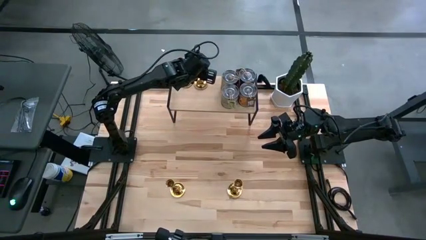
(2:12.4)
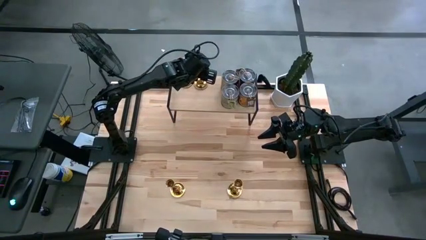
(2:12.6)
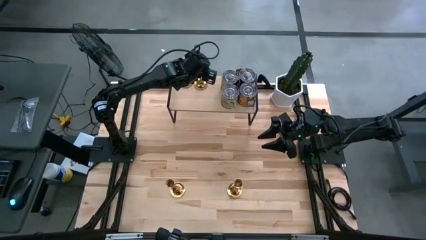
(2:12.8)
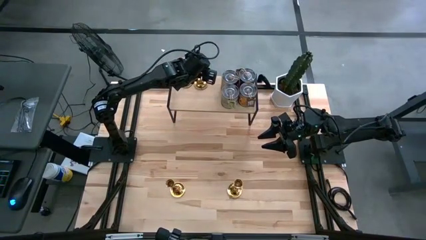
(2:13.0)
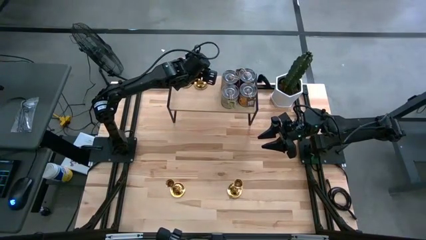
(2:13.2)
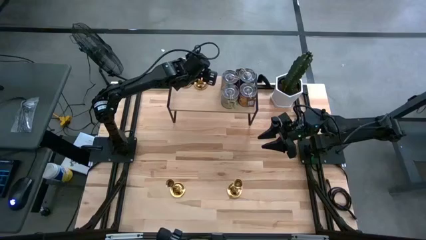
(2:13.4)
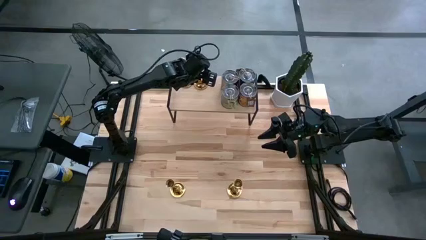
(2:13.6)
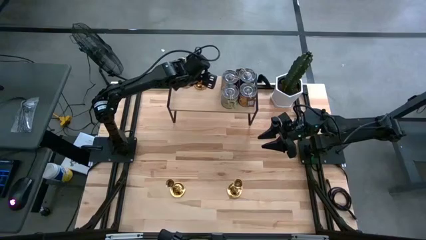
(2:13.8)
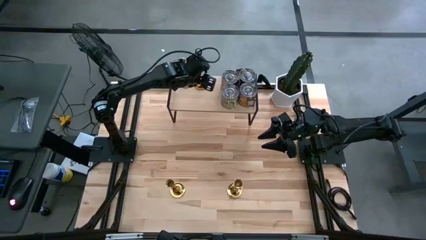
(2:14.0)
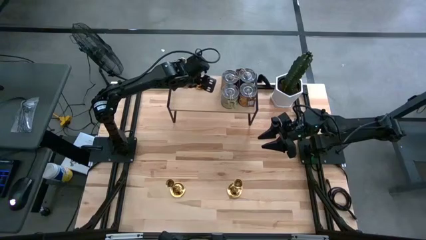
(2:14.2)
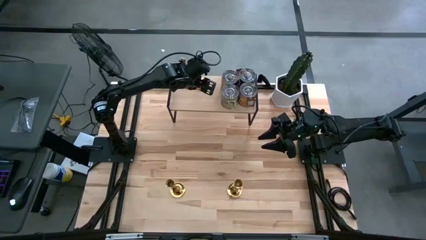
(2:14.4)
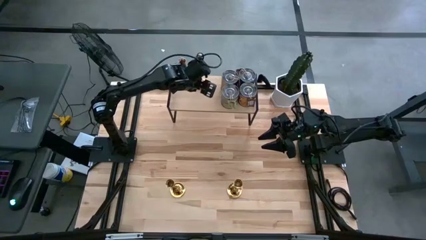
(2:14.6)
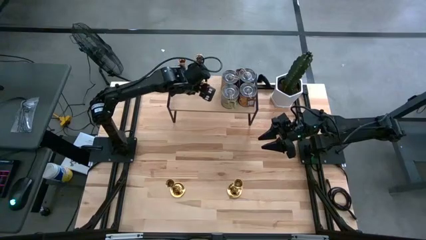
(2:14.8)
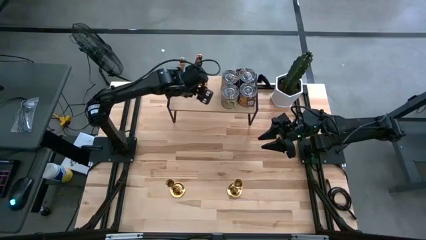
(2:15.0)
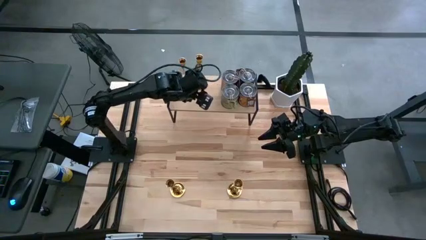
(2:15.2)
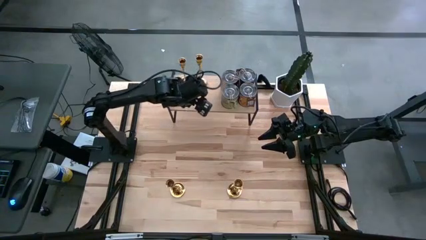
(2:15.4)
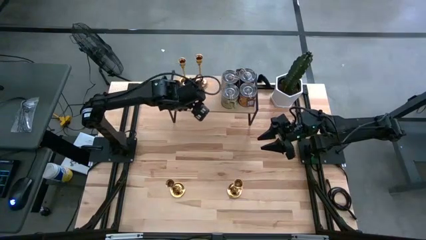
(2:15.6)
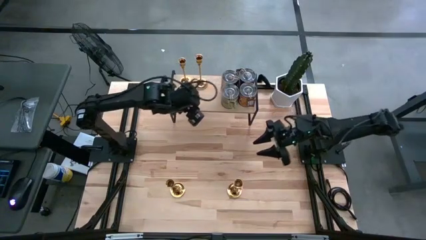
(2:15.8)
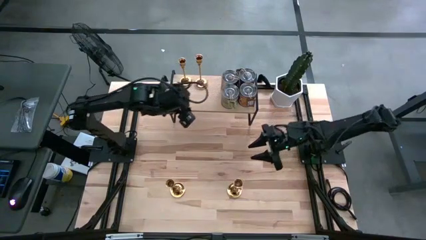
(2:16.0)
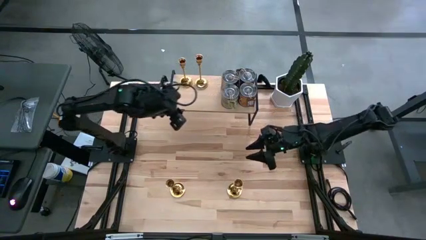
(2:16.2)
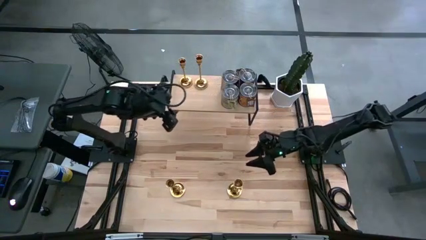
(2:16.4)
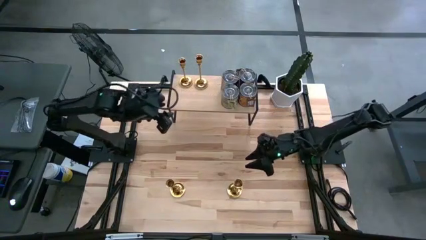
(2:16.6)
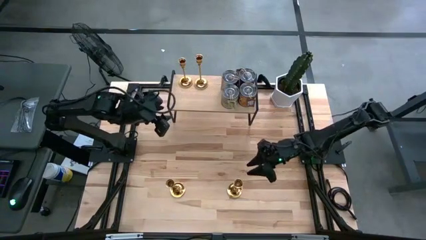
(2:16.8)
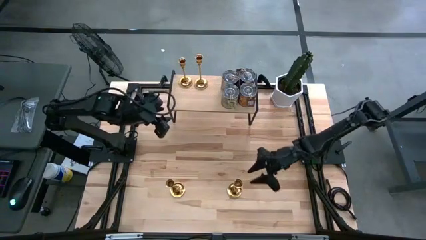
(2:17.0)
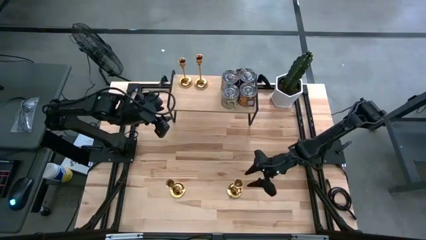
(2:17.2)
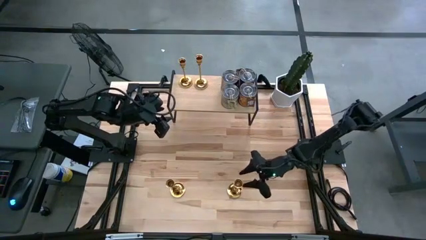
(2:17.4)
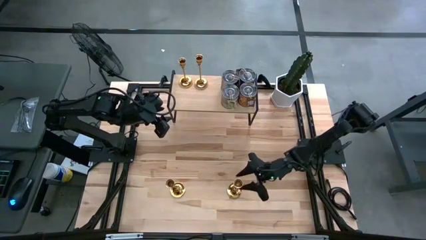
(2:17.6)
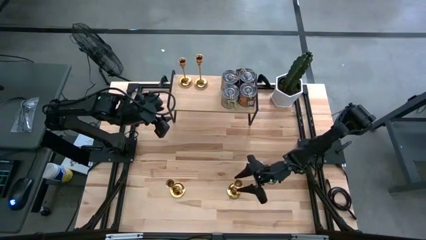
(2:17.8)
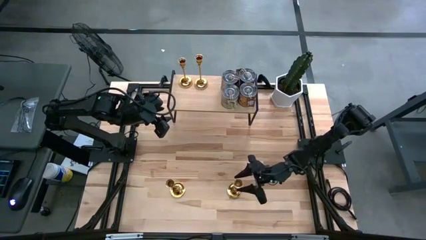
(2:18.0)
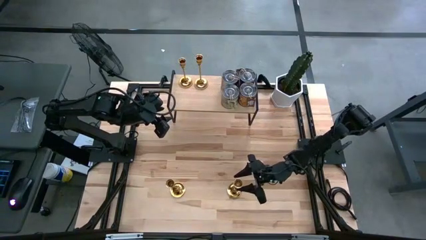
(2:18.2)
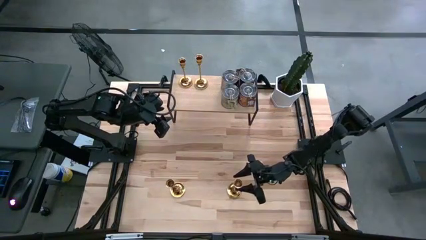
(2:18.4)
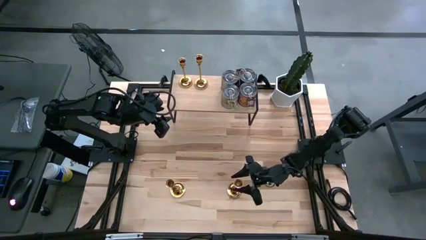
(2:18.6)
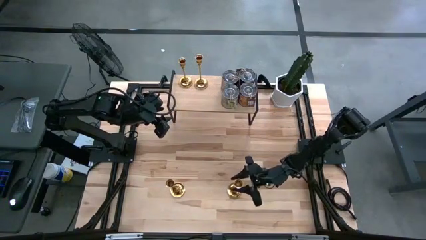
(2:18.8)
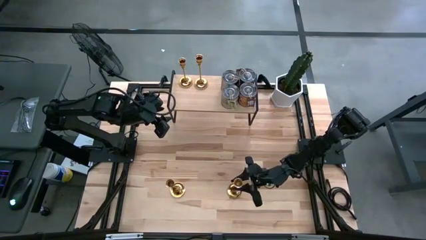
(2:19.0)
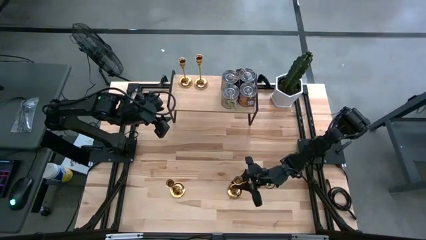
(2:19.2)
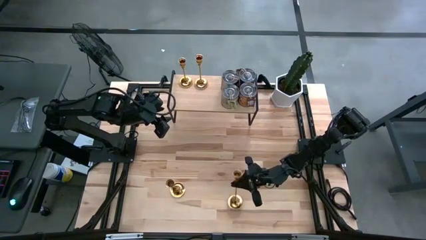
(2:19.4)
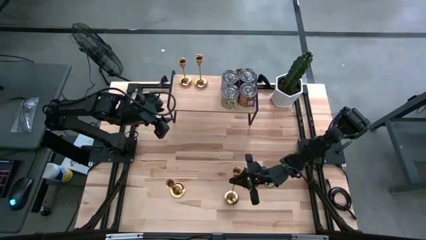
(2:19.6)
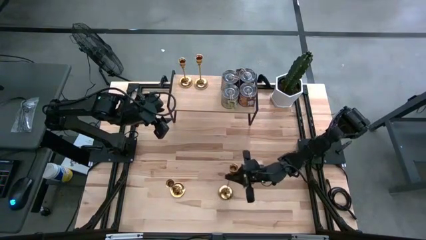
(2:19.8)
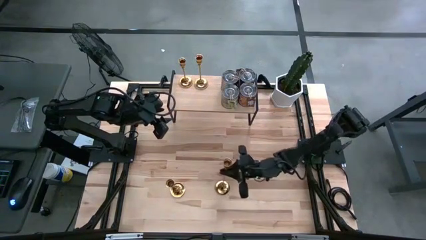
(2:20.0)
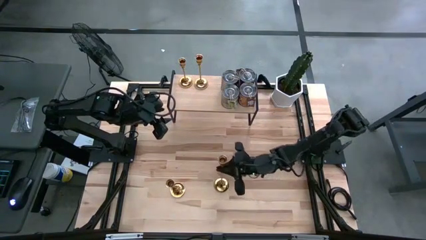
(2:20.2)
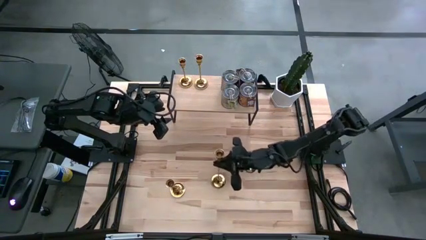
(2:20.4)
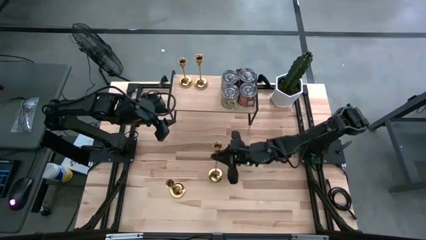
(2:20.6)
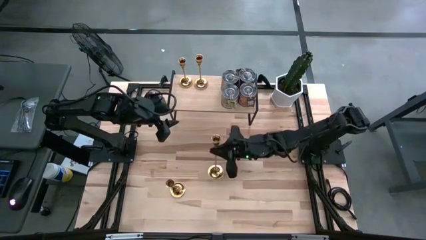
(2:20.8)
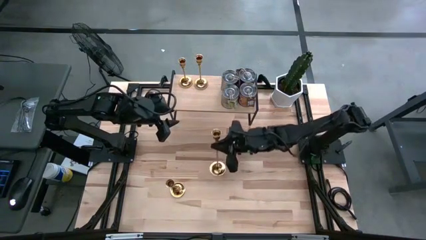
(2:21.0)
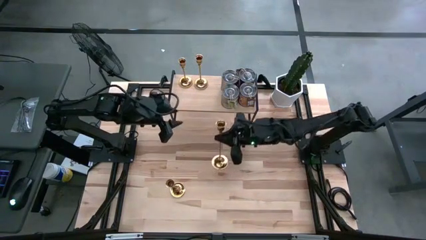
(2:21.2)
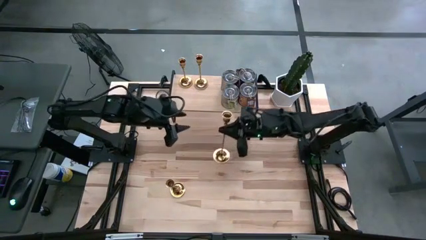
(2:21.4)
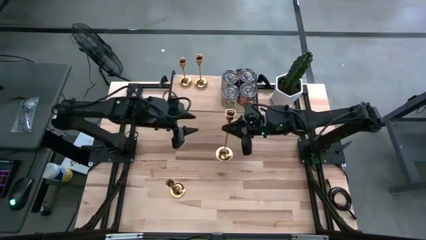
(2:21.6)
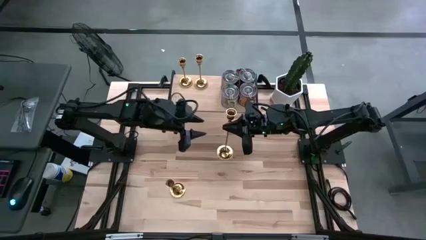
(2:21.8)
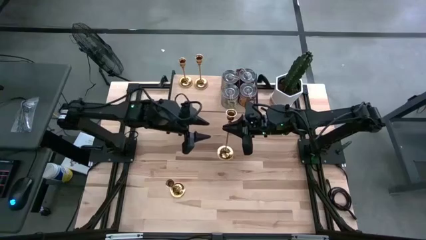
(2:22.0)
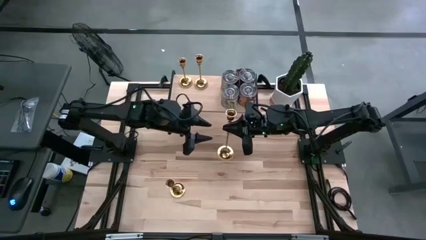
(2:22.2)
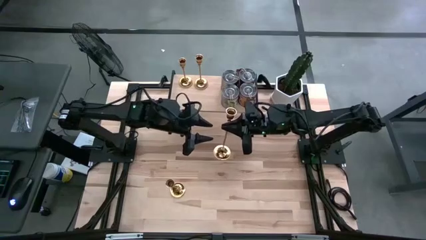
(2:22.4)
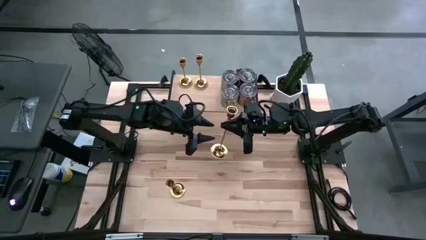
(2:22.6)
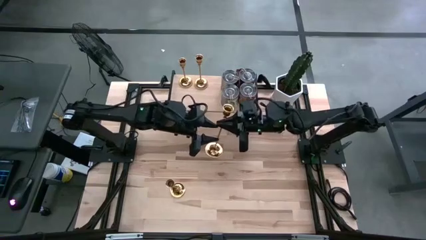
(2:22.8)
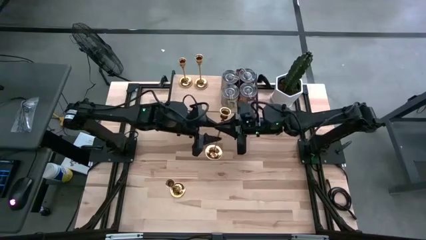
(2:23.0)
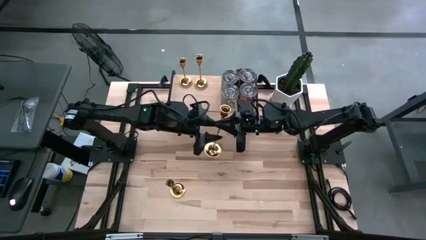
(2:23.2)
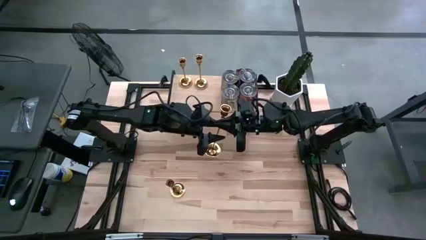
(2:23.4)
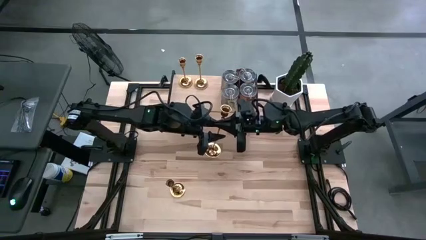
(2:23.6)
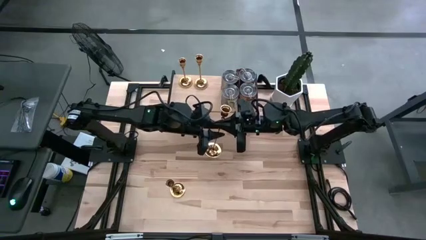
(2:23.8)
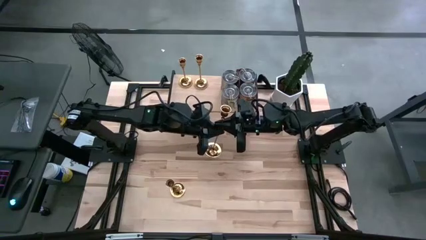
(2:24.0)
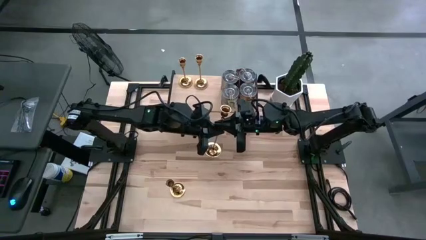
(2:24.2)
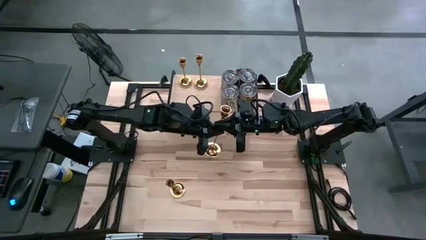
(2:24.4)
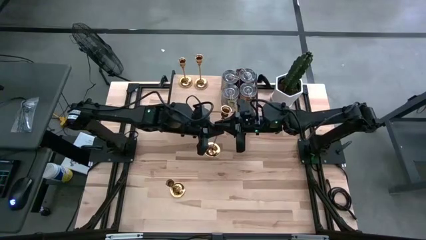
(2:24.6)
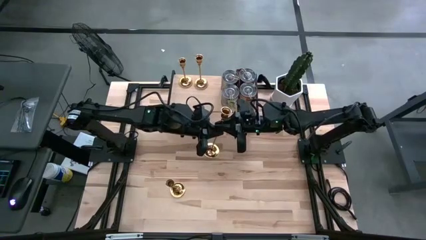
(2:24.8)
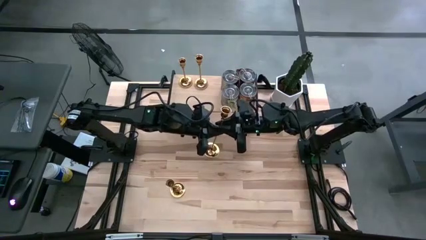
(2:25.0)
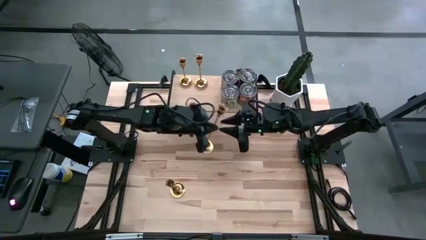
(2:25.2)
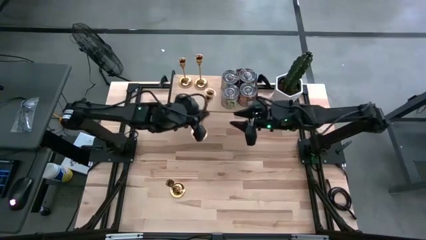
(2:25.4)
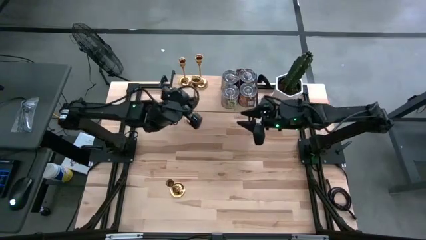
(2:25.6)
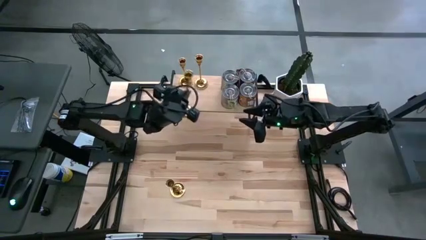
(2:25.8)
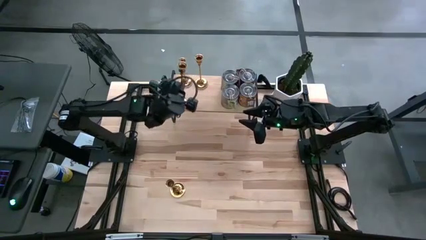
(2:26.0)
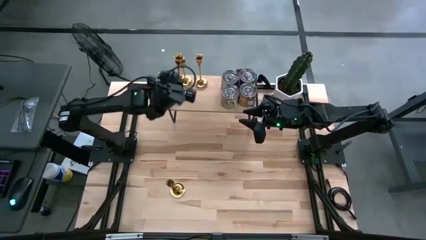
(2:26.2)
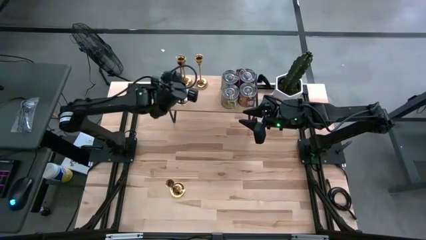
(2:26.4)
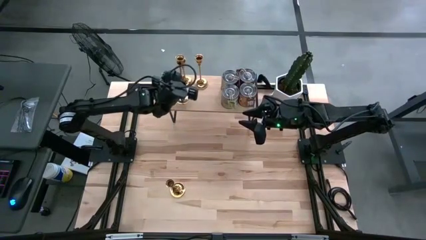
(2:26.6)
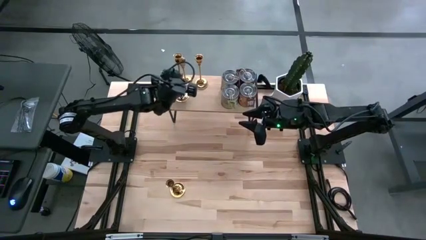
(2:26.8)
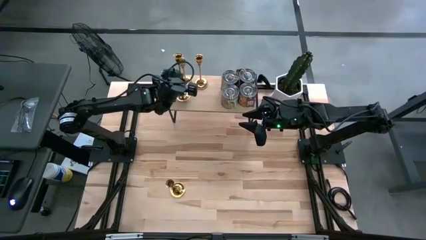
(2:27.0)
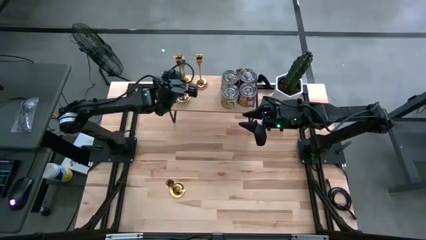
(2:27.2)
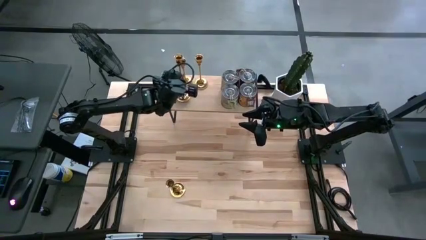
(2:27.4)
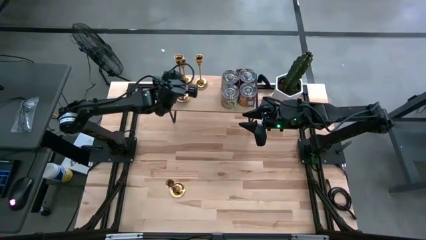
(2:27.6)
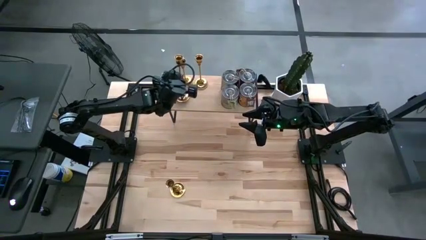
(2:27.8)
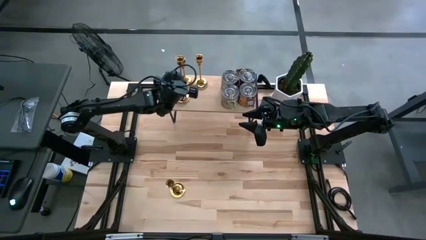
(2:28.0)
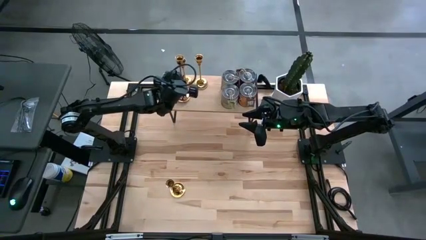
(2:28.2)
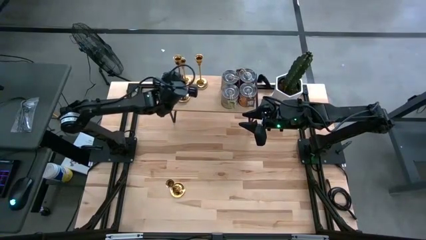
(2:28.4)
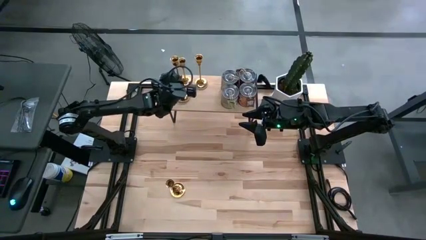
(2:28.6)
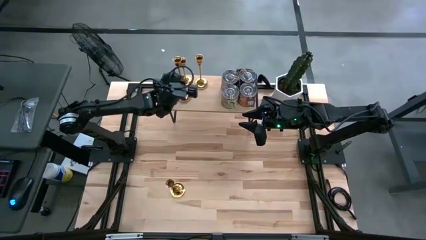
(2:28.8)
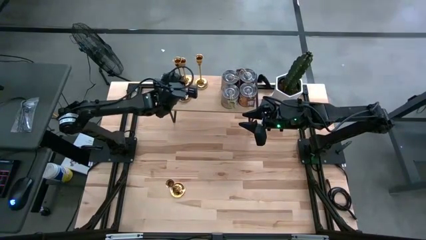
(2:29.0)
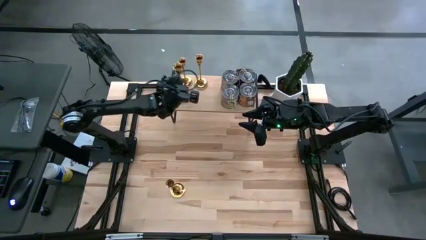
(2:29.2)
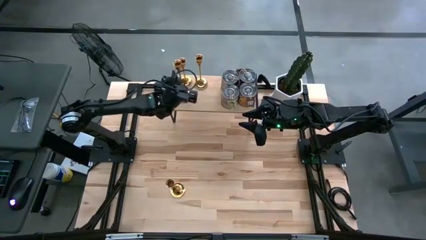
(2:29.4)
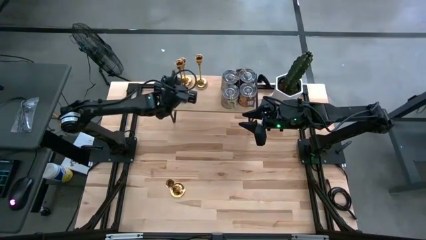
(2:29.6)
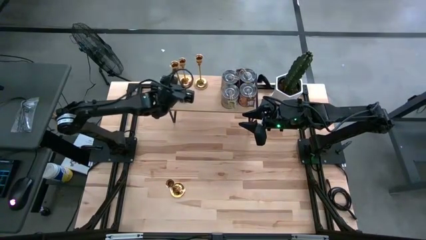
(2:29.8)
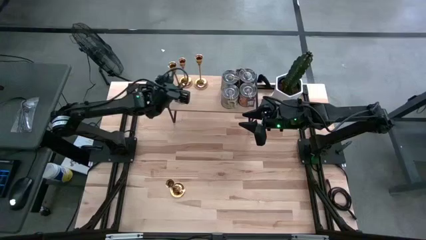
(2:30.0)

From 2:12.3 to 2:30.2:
Task: Pick & Place candle stick holders
Put the gold candle holder on the shelf
